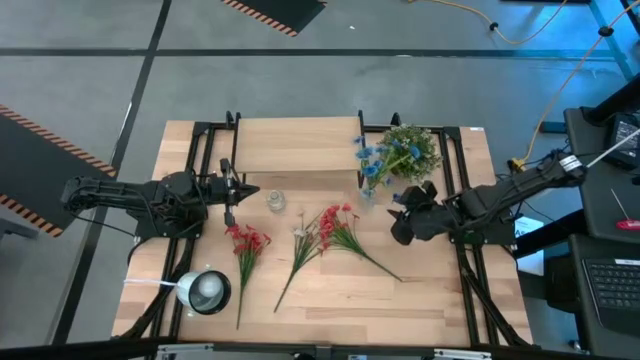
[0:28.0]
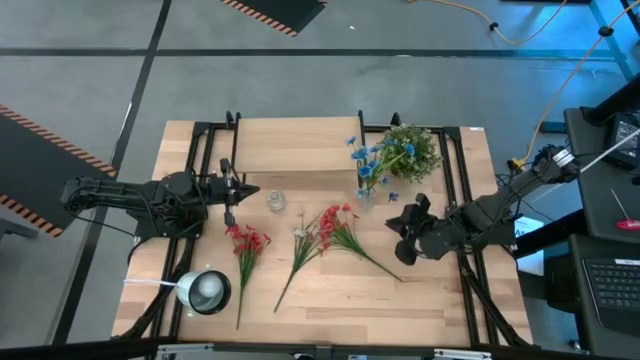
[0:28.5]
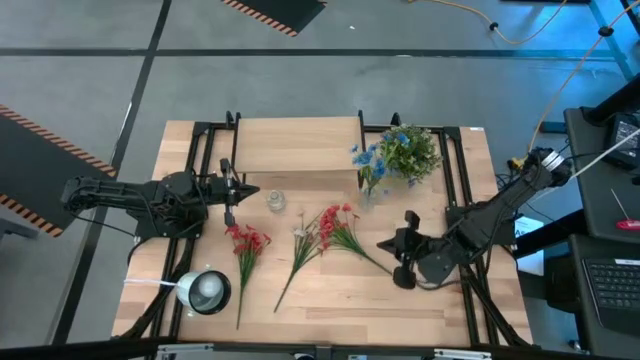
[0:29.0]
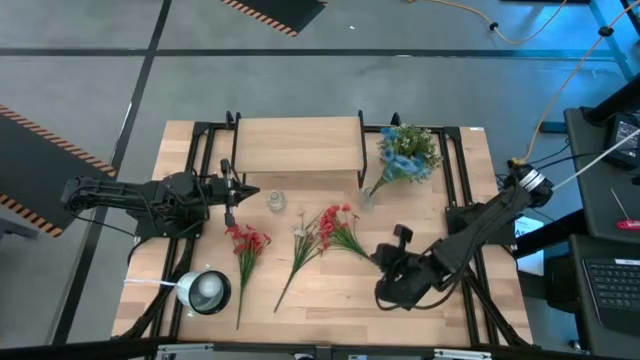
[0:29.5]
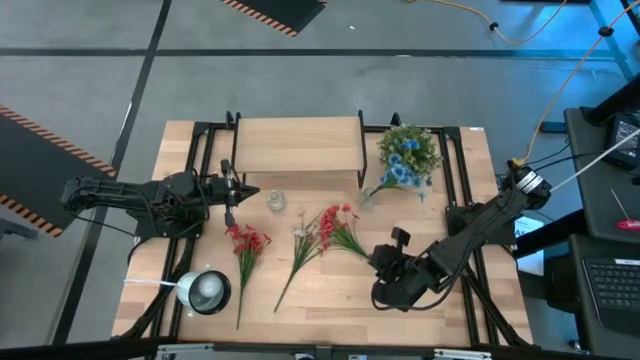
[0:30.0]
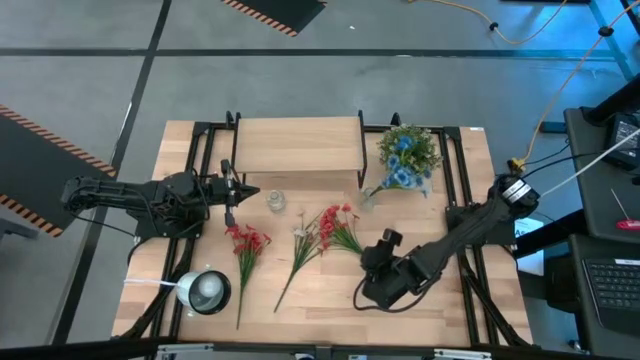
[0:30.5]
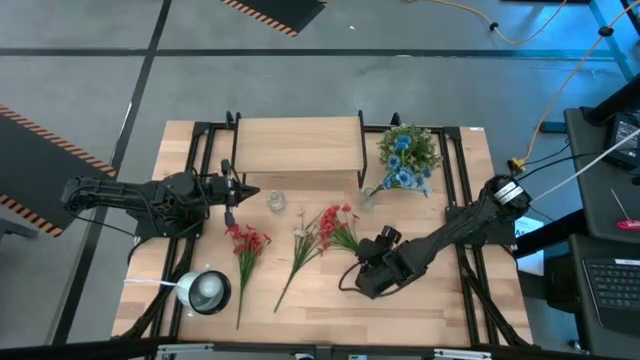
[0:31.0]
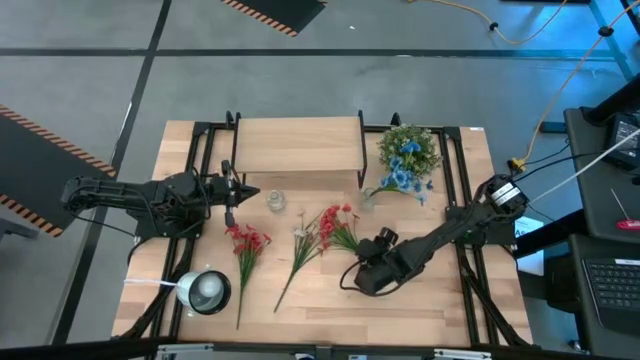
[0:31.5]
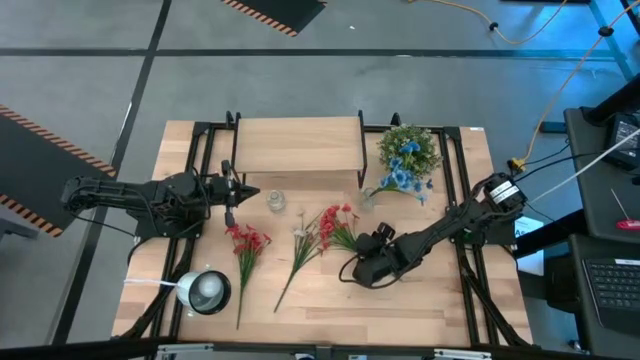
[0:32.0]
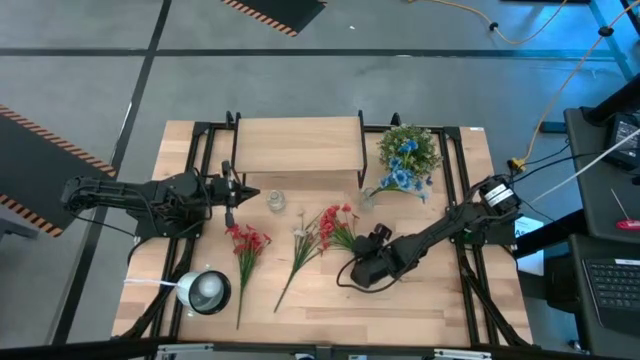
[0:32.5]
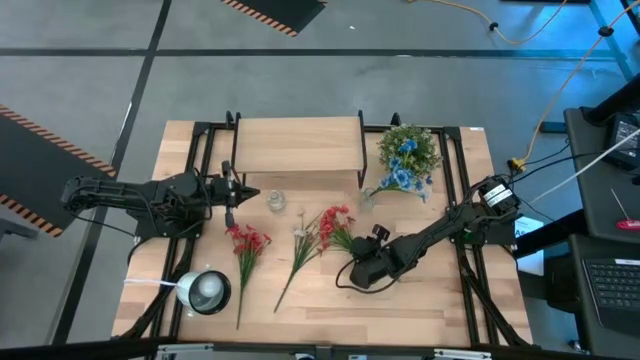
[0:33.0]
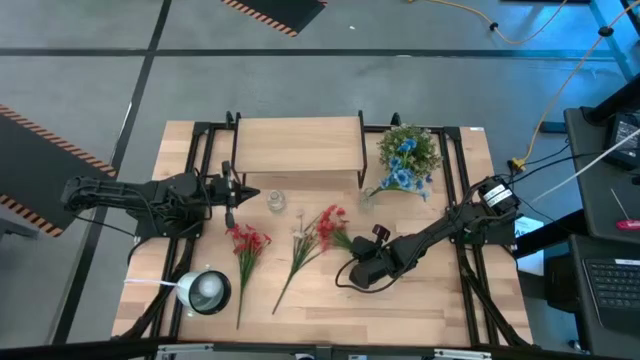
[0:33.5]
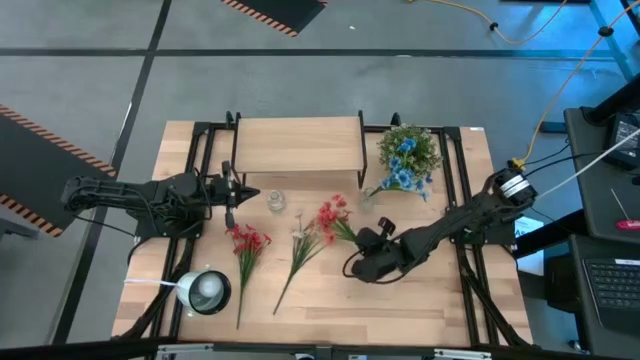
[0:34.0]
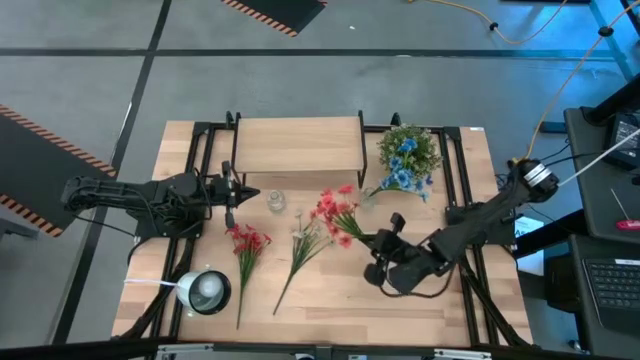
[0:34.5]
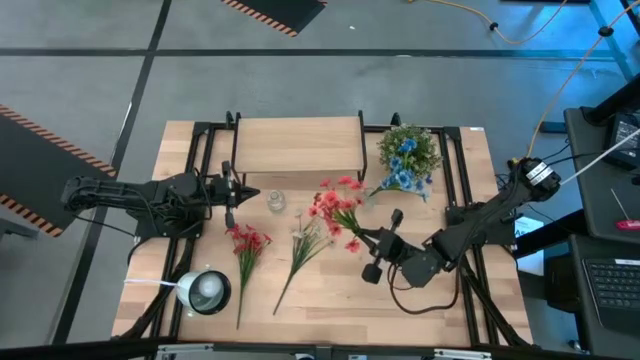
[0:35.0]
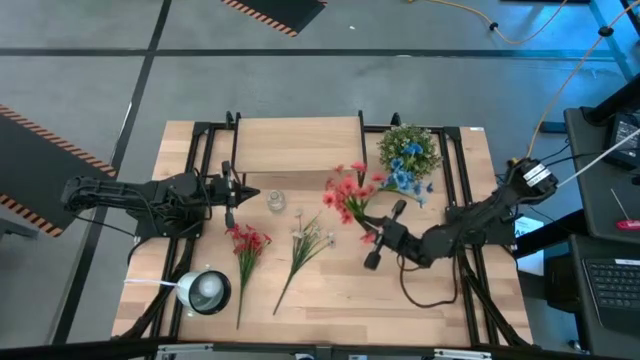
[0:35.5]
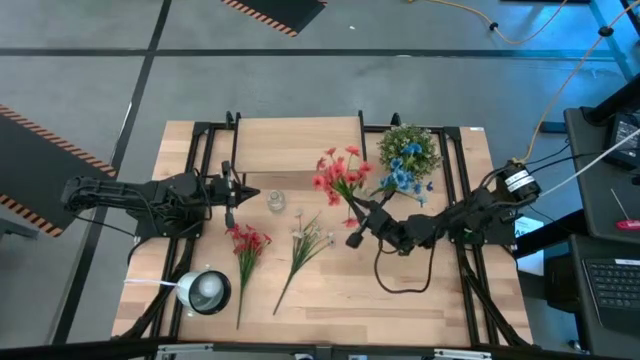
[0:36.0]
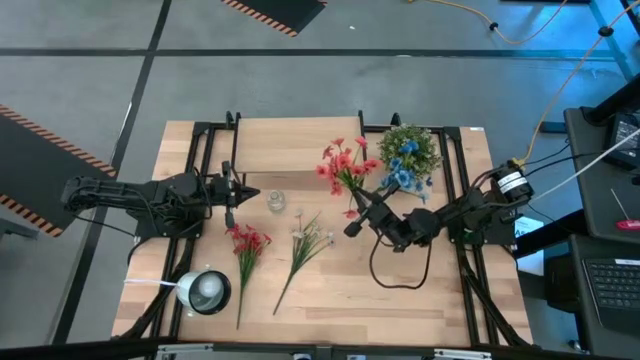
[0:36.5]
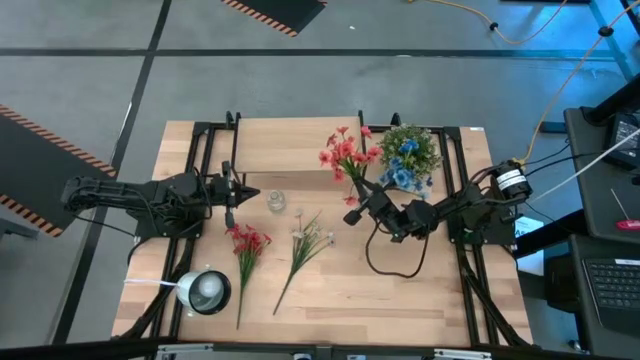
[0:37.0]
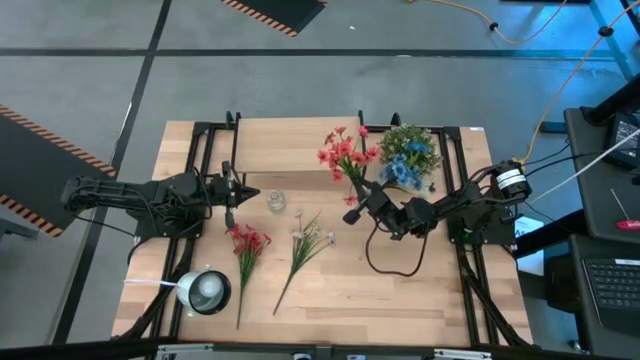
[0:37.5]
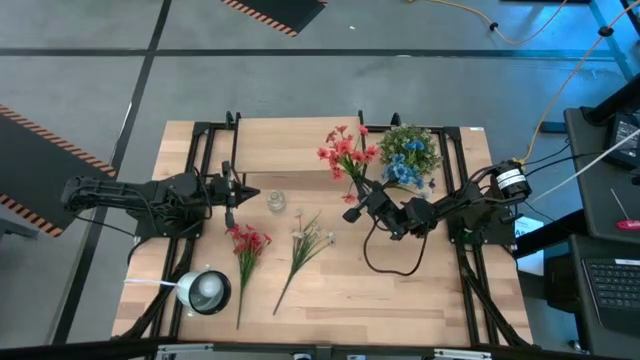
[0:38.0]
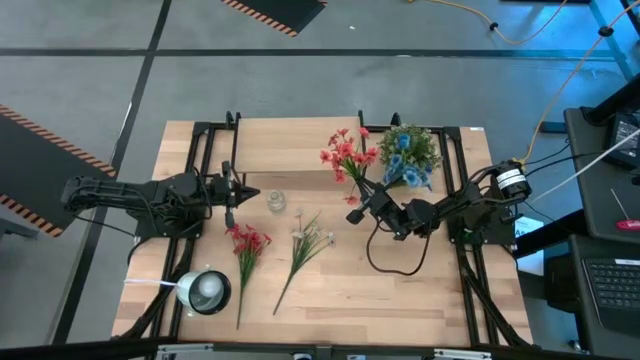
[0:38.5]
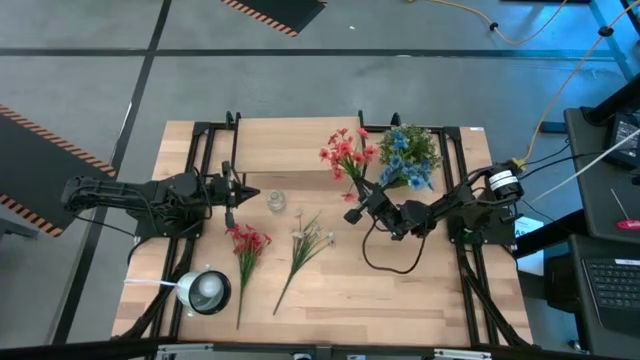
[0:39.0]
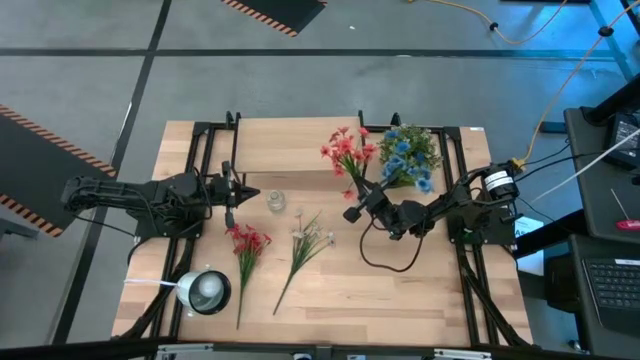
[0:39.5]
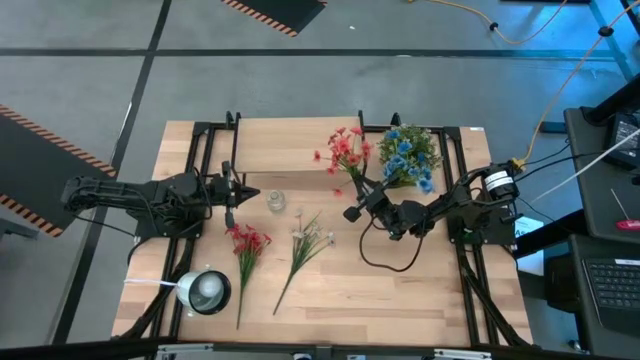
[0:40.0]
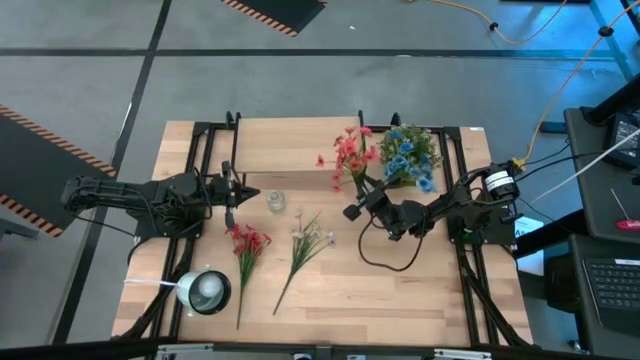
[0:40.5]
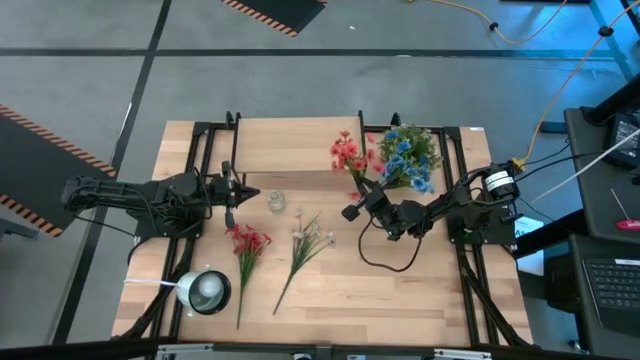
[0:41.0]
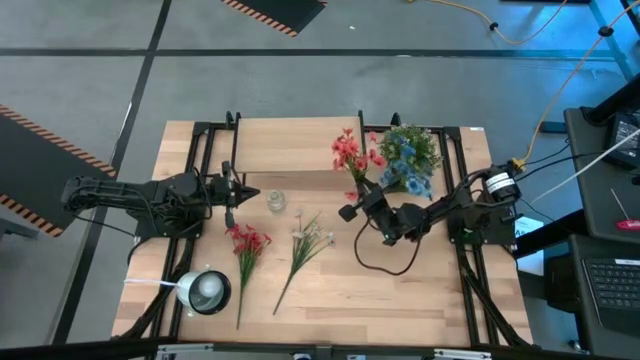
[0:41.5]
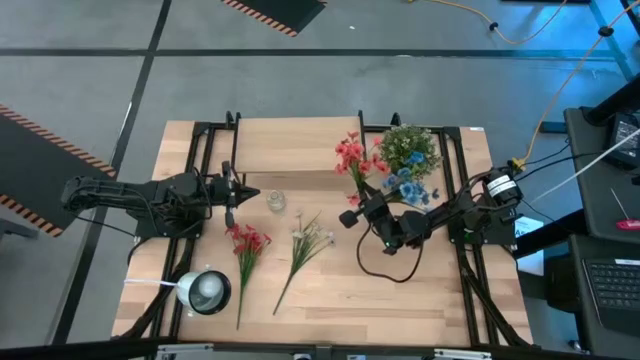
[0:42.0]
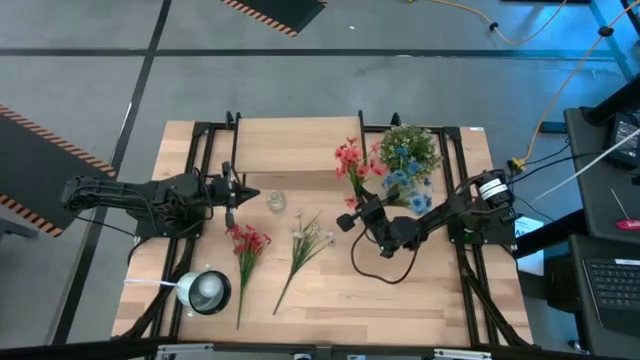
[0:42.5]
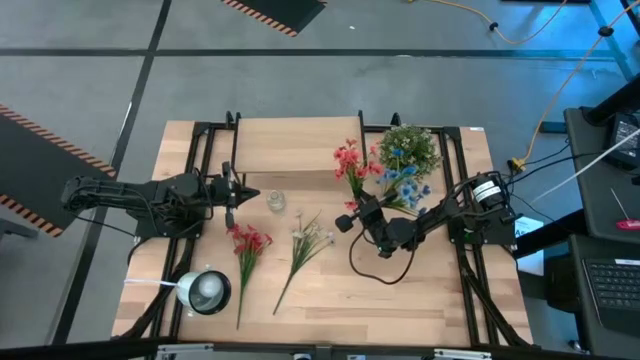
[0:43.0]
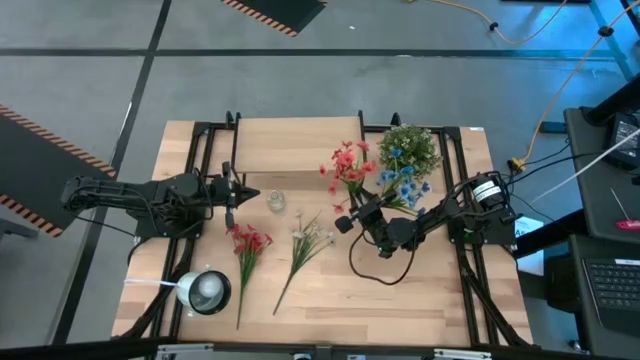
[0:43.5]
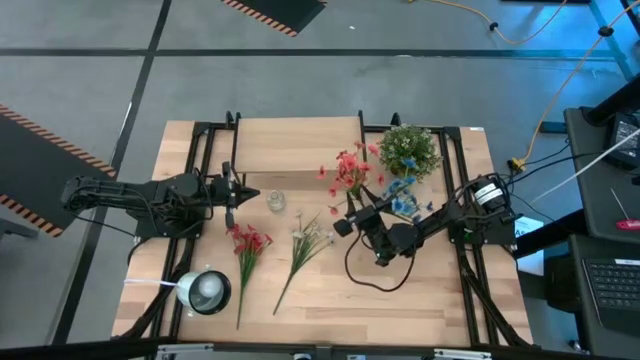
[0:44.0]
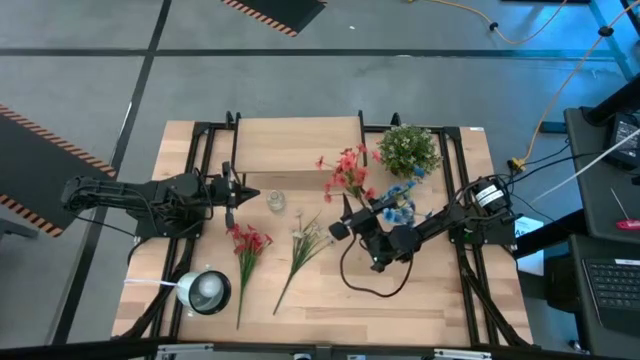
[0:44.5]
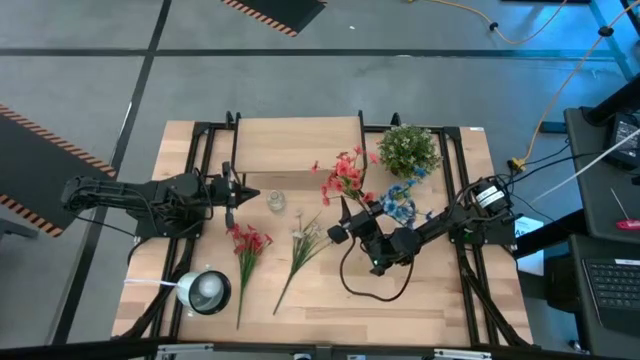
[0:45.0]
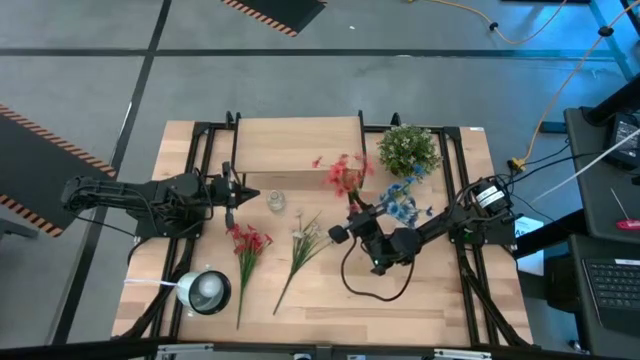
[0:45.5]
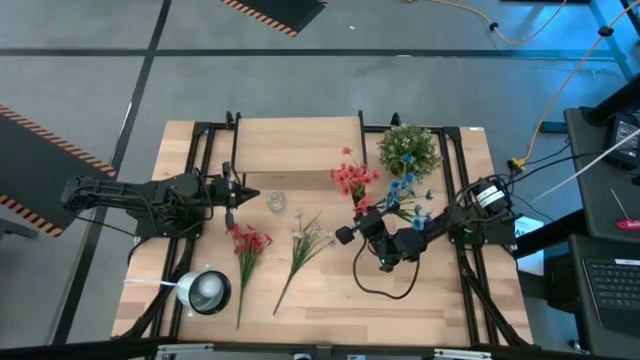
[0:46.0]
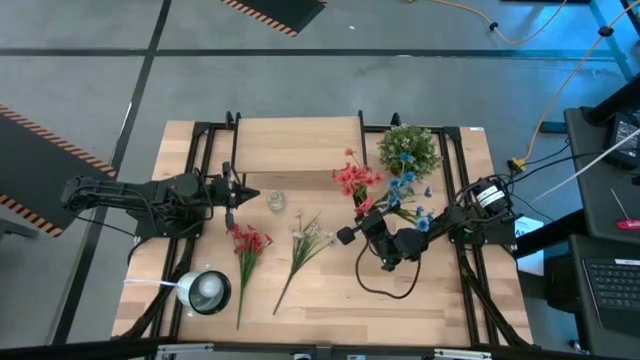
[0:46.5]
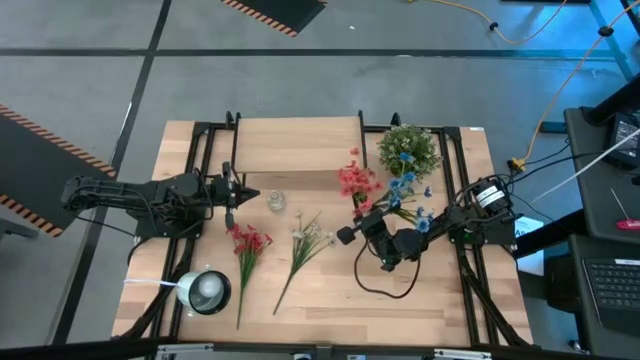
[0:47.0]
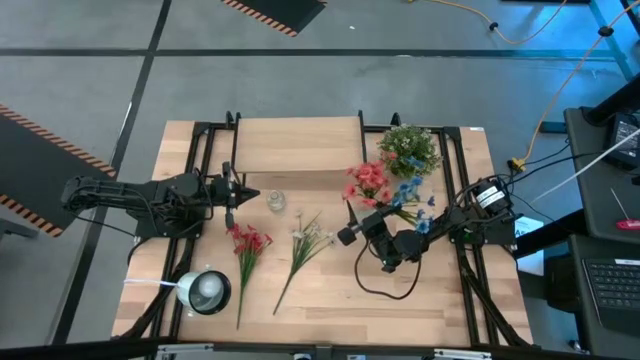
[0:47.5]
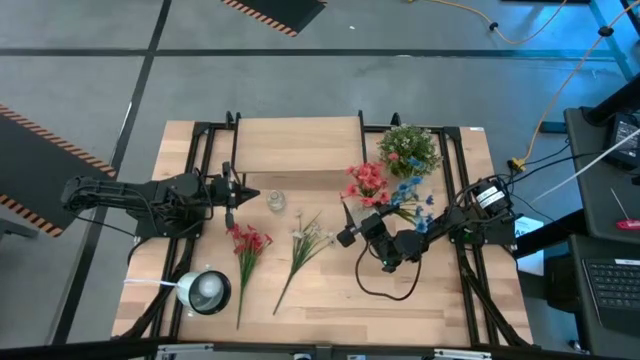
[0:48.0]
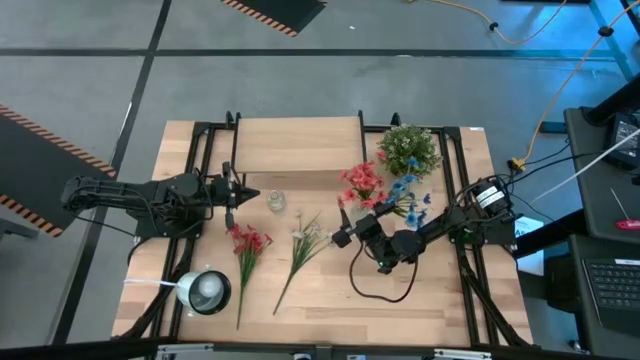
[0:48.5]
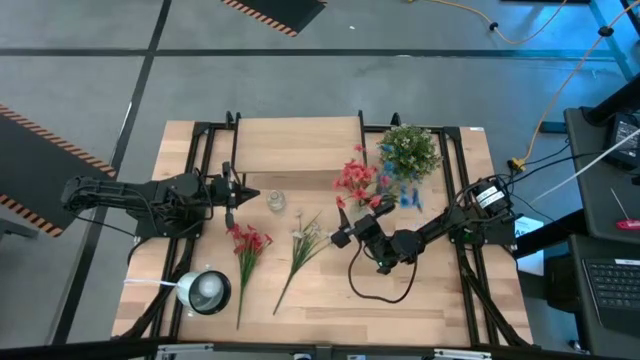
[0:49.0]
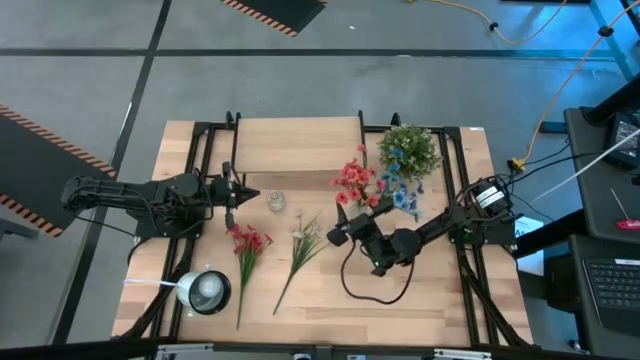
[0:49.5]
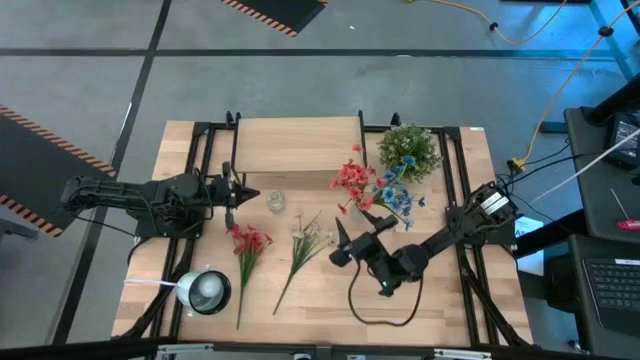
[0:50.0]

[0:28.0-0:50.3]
Task: Pick and place flowers into a vace then onto a shelf
Put the orange flowers into the right transparent vase
